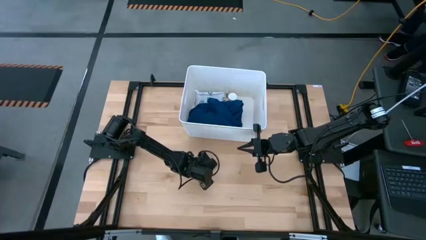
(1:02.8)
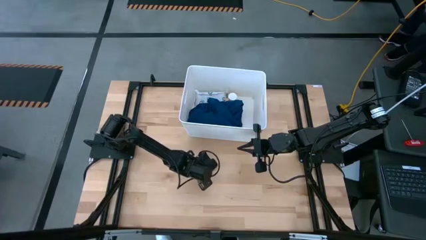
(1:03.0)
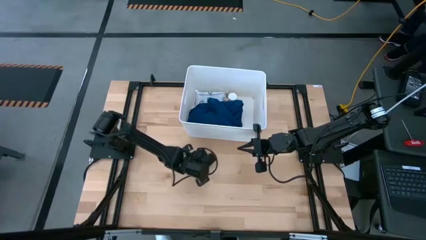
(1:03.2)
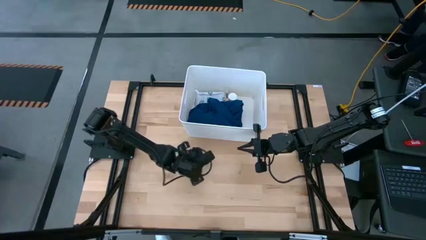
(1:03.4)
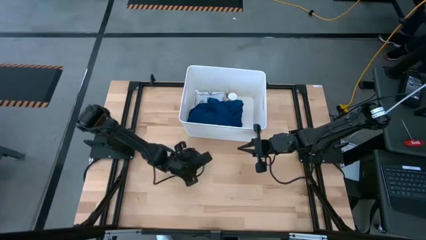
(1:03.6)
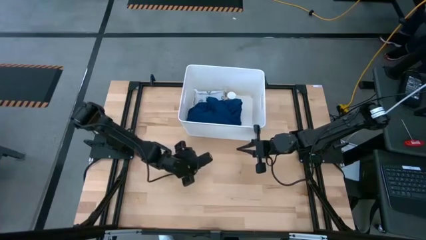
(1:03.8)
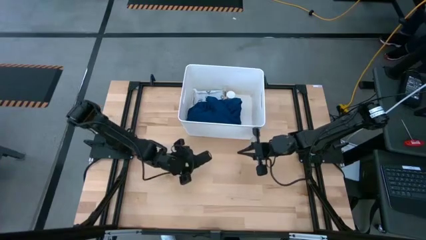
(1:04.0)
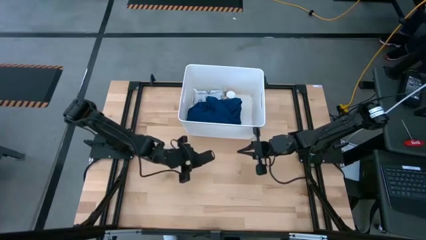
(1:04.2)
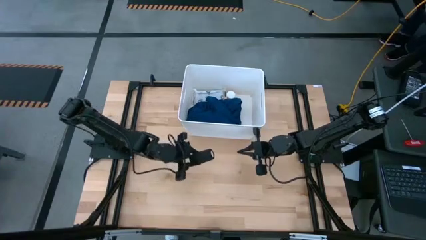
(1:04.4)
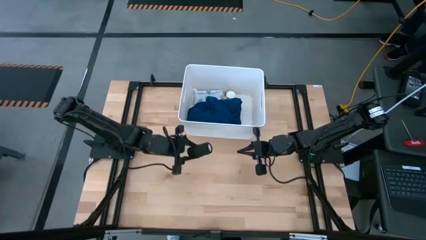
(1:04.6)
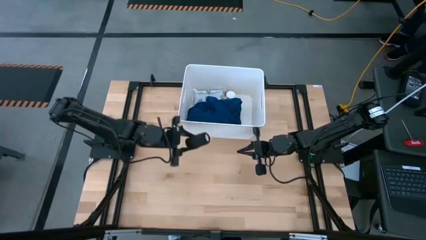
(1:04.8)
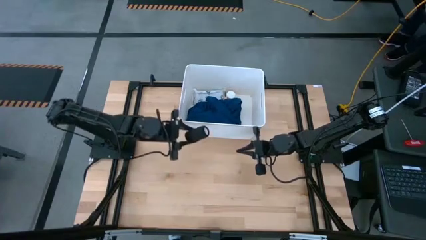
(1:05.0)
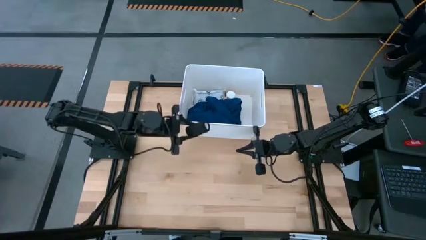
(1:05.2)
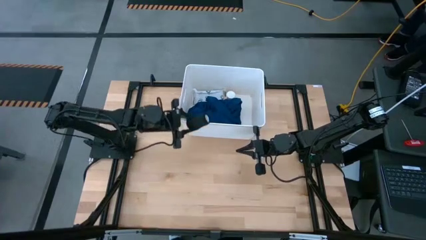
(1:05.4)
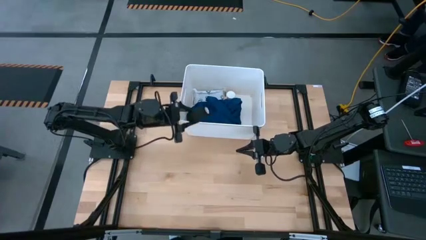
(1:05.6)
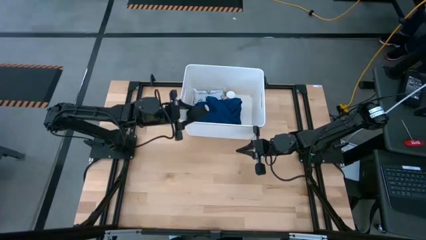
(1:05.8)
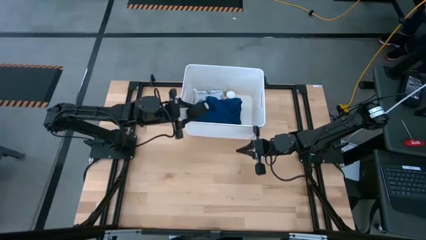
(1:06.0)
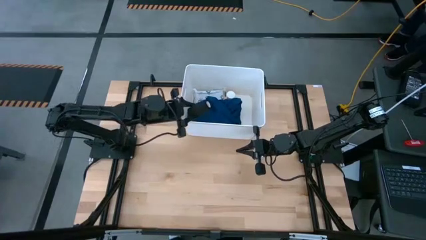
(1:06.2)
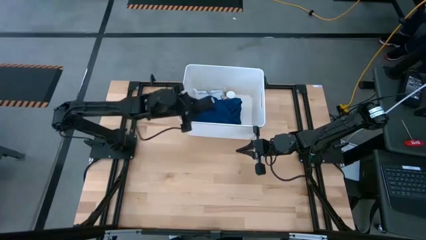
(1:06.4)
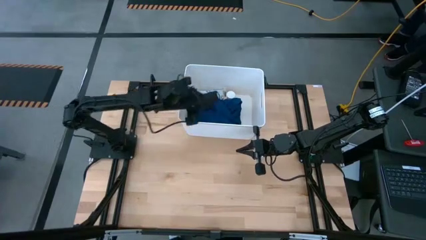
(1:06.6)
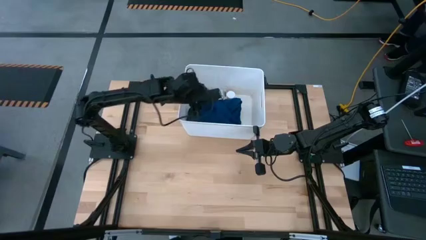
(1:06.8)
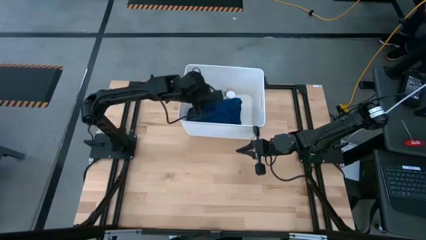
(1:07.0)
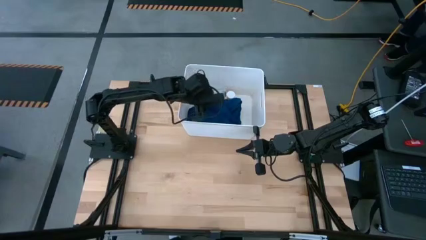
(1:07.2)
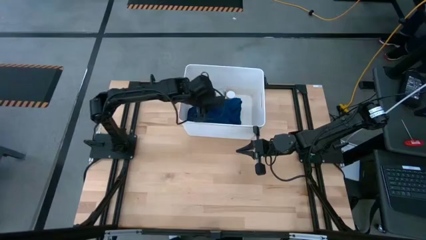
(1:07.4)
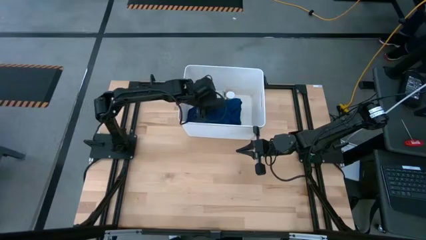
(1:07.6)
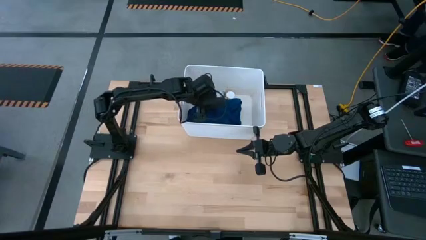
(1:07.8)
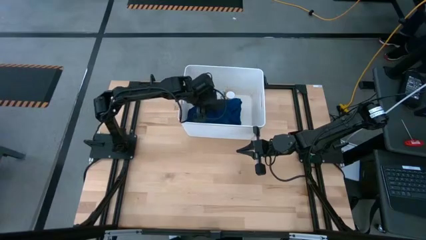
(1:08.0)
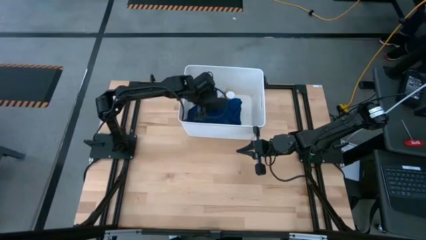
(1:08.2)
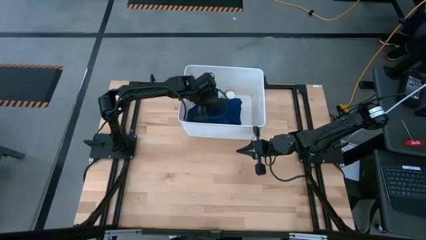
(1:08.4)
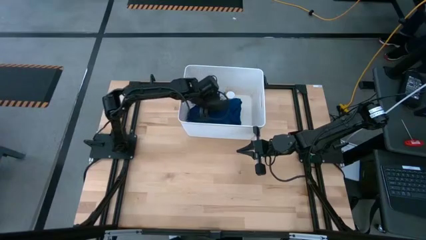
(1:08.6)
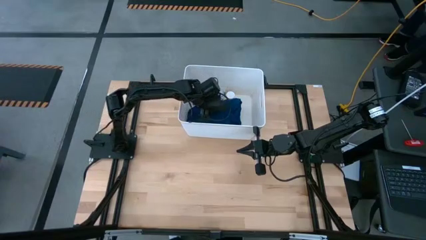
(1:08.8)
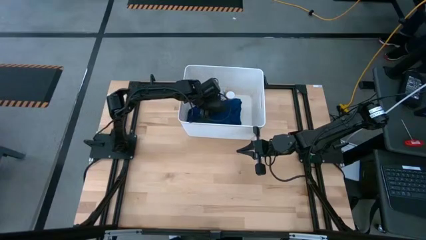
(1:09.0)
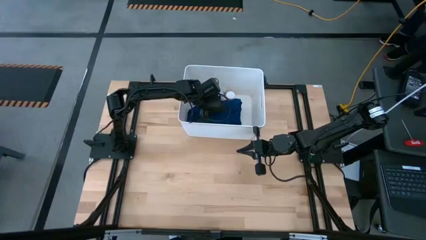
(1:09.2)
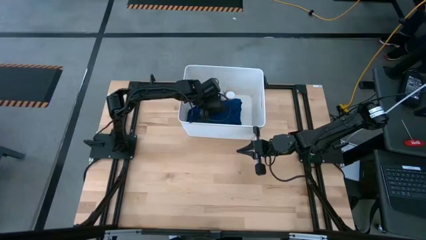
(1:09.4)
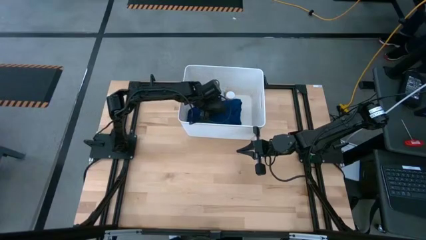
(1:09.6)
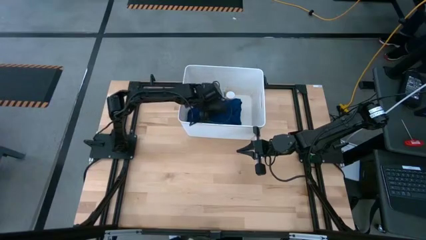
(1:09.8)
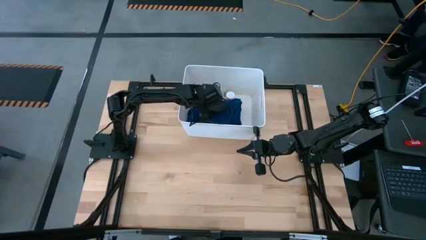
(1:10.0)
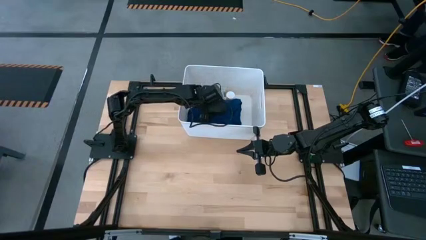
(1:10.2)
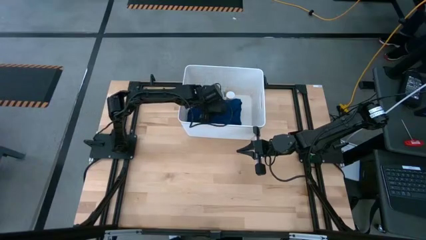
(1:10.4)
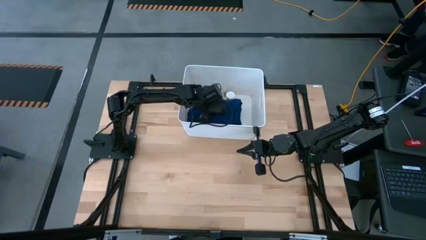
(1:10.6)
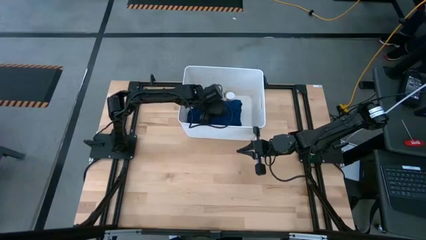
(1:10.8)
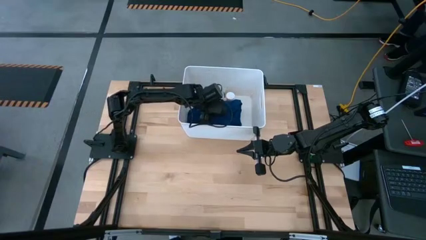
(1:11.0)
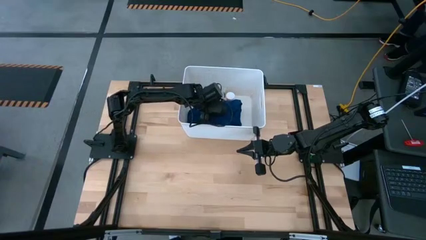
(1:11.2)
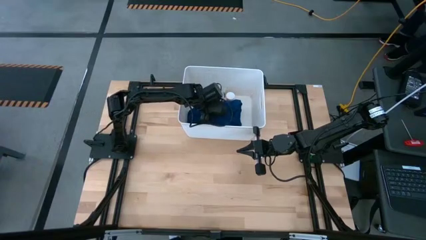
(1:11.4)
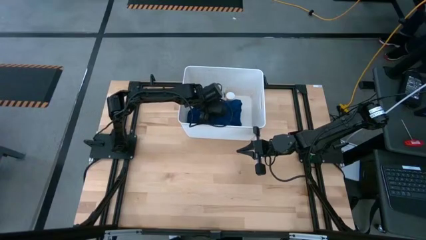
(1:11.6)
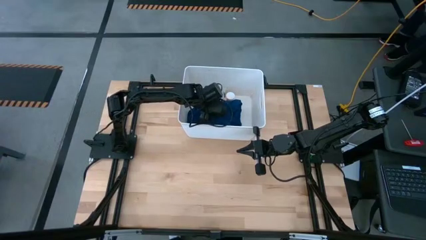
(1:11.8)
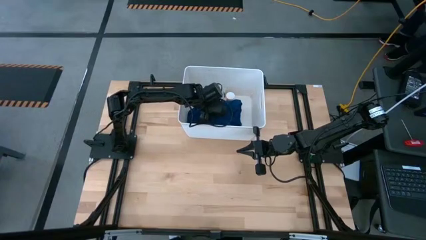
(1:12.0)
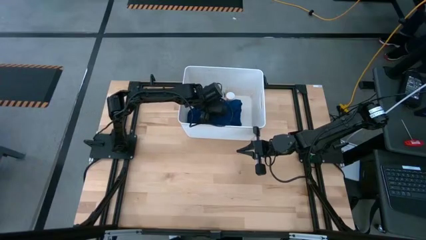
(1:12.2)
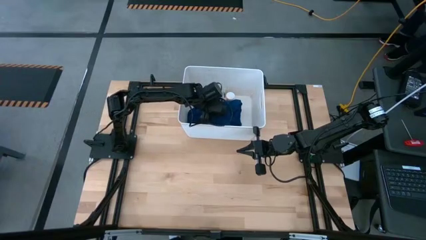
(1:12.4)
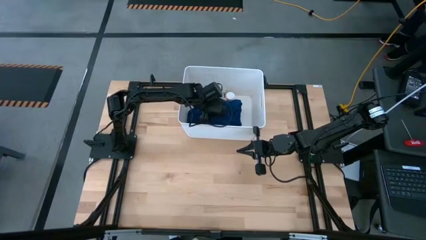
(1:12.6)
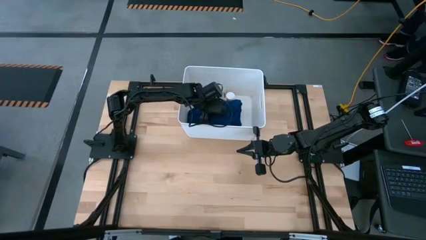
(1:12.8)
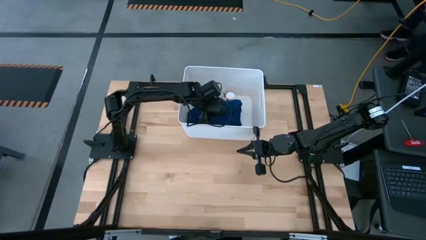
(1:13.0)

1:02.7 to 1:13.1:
Task: Pick & place medical supplies in basket/bin
Put the black bandage into the white bin

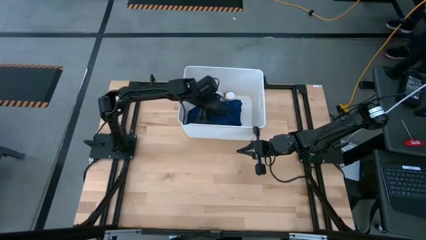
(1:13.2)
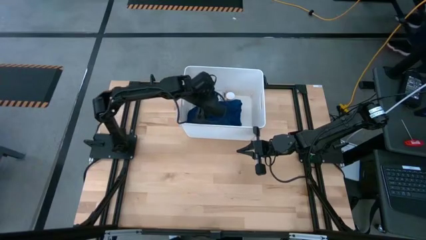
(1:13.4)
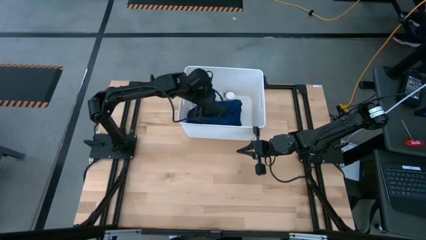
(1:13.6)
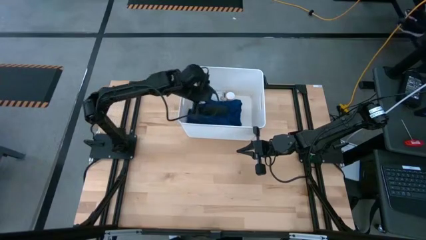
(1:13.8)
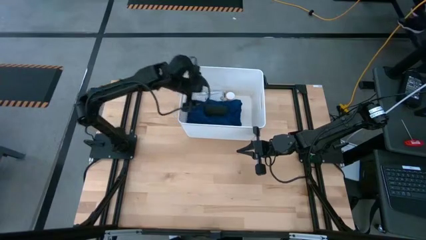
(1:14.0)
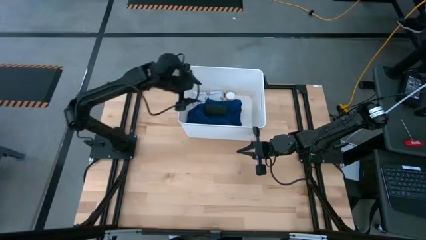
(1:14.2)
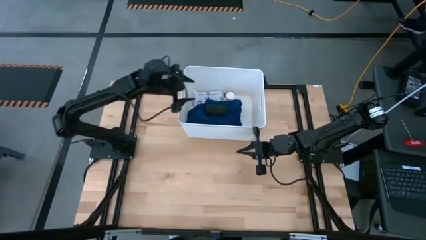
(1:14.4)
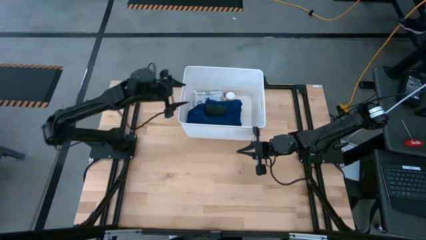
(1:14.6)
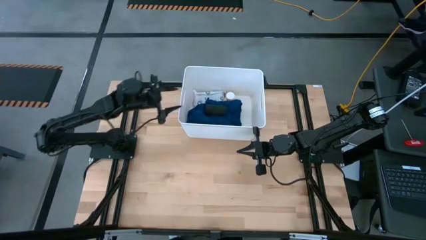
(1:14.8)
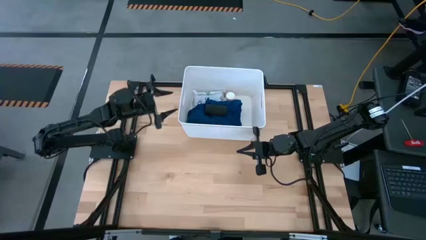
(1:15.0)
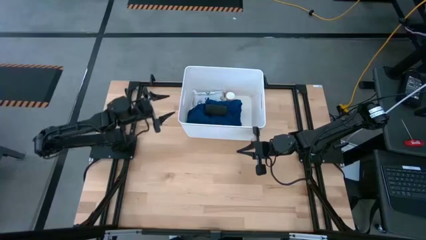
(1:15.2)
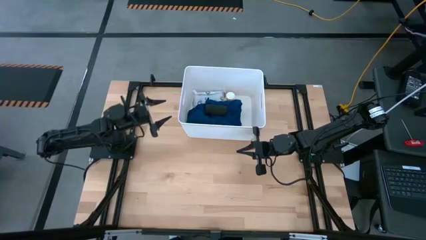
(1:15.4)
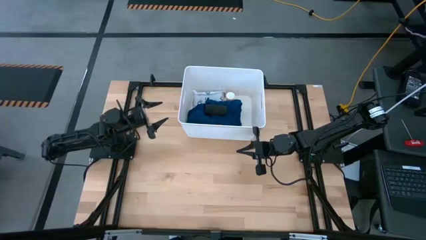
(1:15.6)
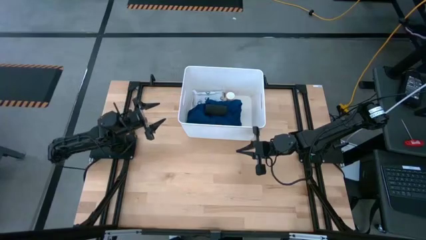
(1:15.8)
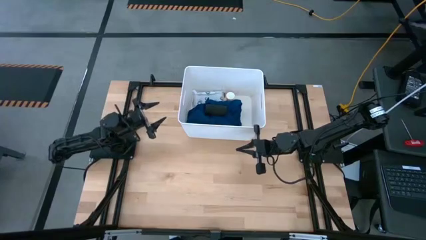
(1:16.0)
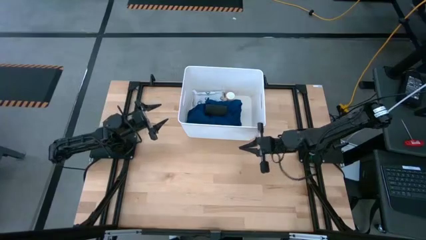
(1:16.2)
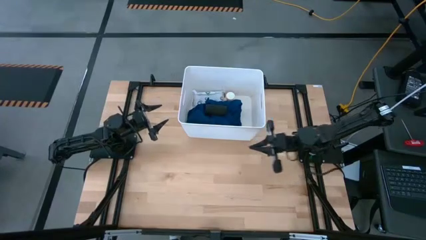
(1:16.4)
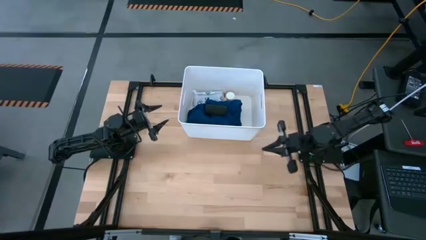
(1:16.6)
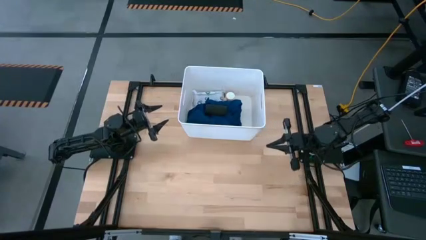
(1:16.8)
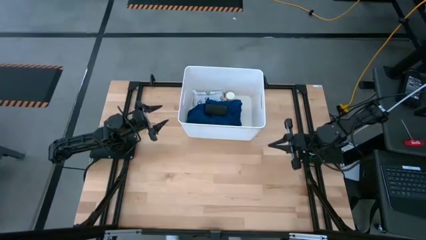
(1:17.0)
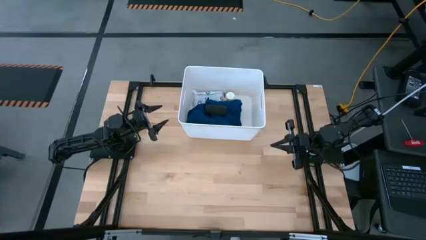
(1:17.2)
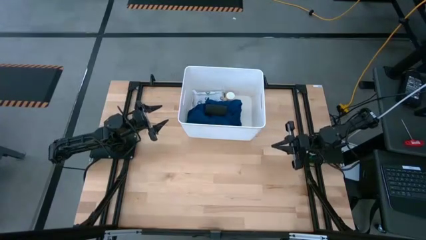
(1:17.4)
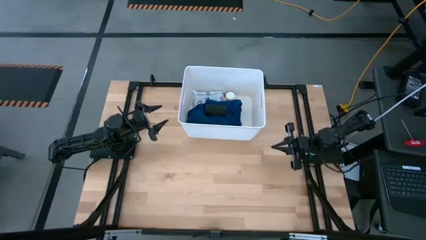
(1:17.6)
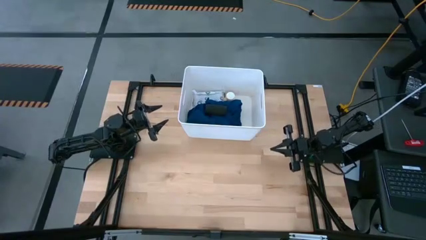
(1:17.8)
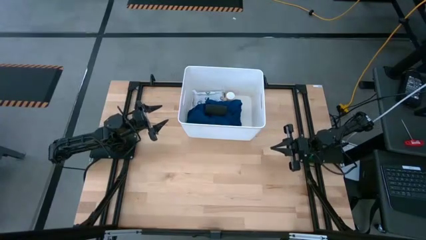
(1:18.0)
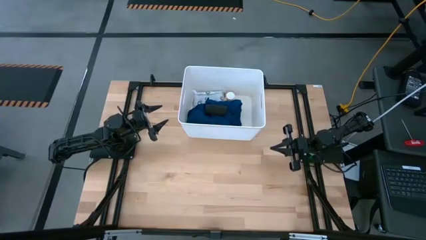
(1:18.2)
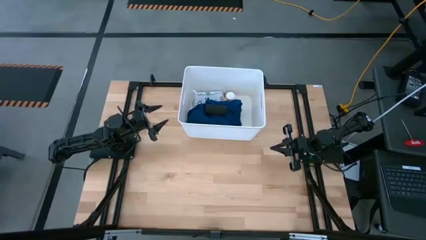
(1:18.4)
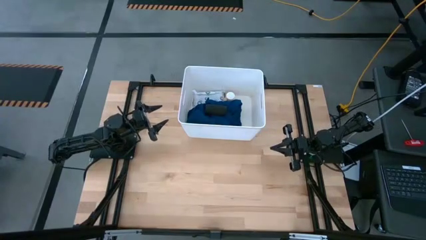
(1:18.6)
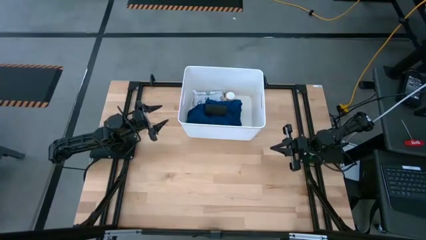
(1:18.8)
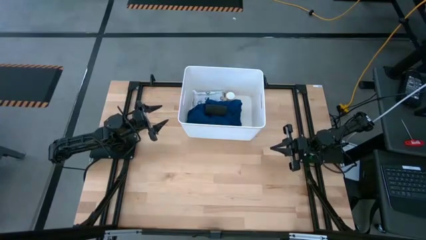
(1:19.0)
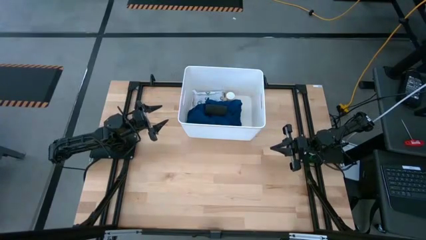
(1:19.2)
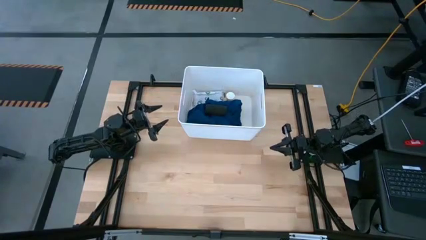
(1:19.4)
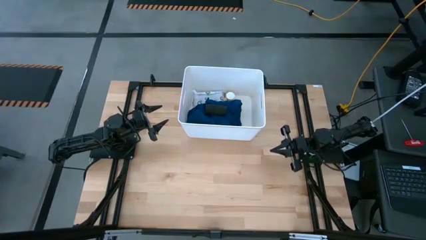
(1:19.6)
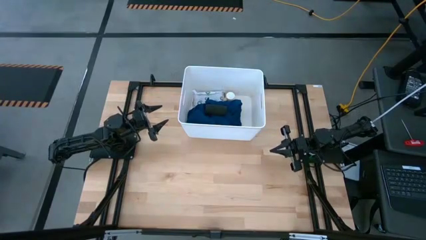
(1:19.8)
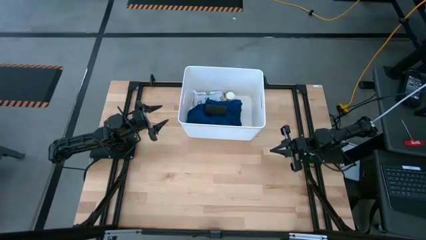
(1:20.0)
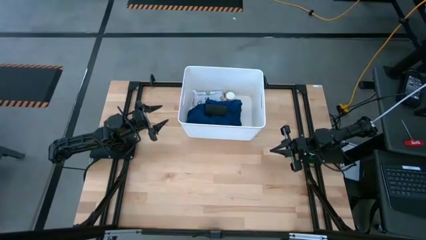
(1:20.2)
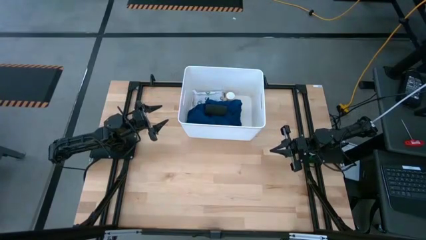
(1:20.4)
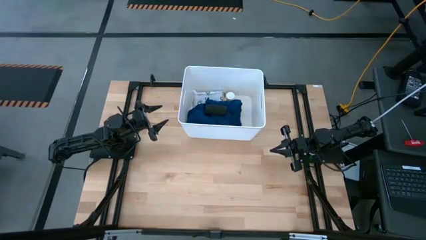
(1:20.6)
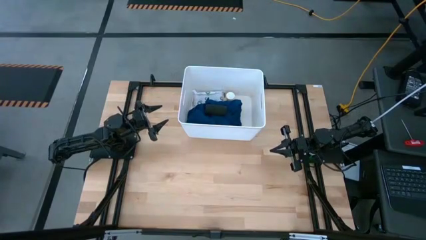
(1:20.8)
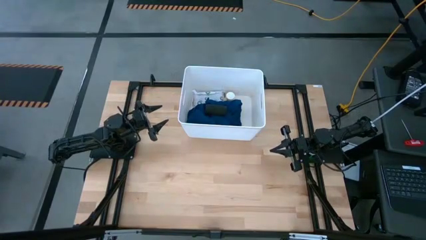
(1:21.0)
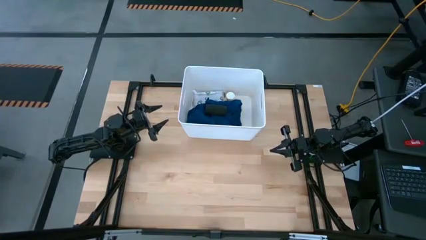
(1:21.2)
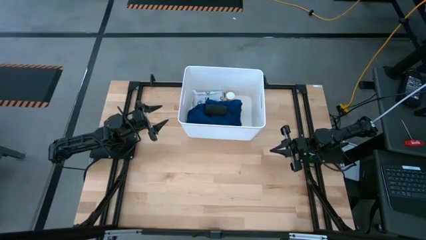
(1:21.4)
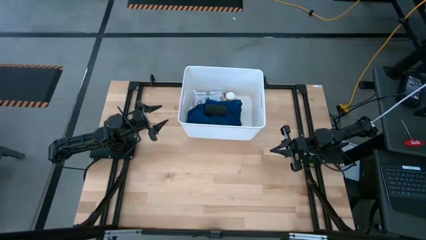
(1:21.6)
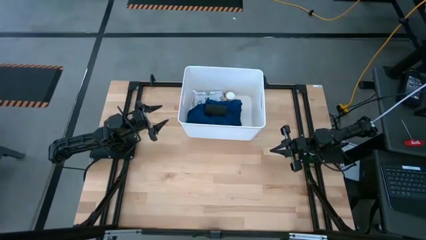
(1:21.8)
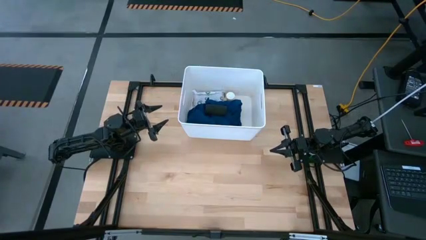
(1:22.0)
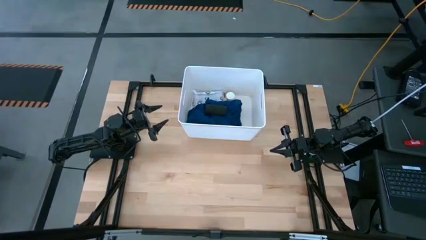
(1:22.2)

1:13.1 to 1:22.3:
Return to Home Position
